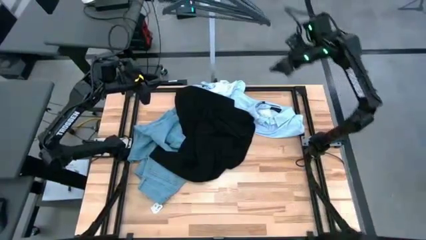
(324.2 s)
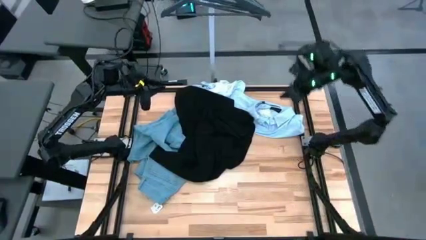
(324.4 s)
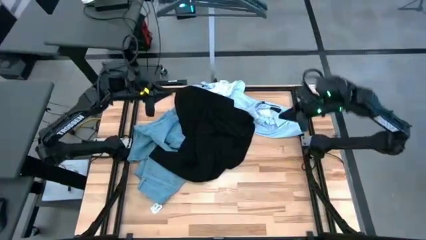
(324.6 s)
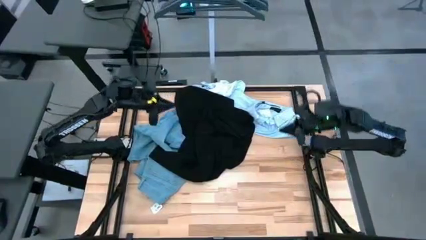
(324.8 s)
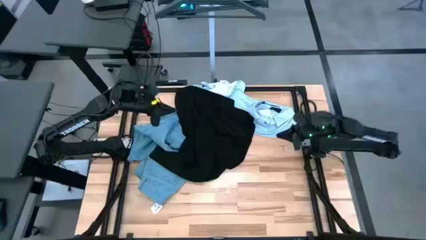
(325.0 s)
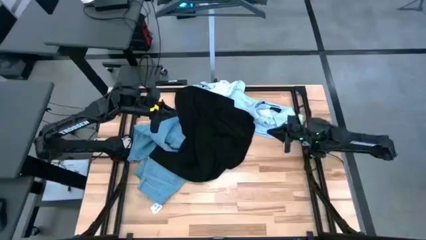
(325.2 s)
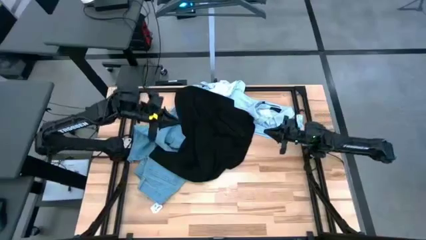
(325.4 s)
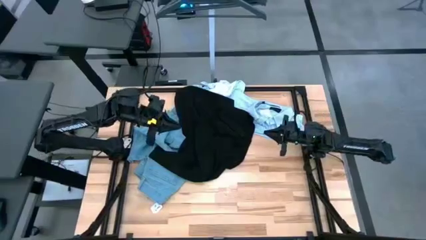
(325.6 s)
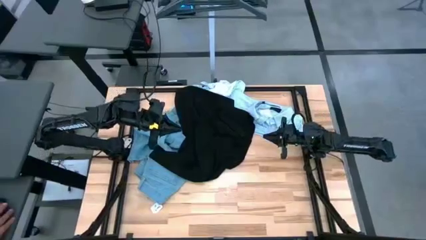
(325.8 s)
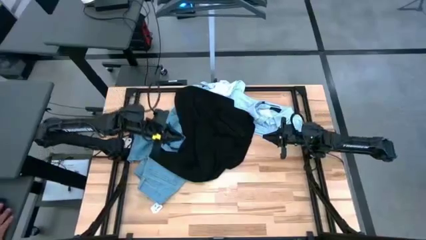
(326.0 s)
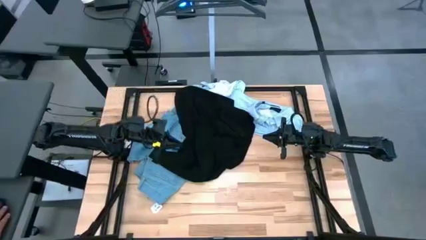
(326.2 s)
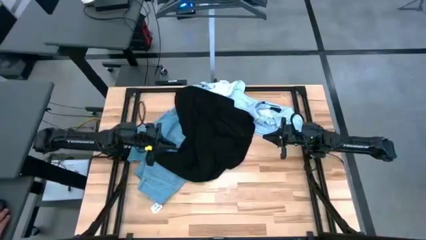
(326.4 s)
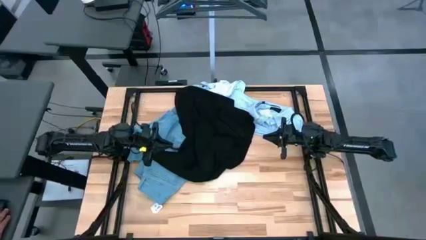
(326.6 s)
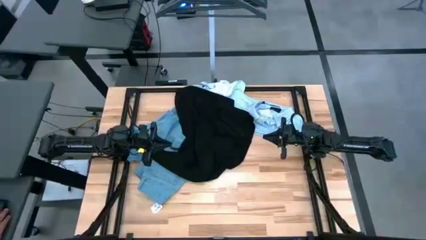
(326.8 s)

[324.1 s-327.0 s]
Task: Hang clothes
Return to Home Position

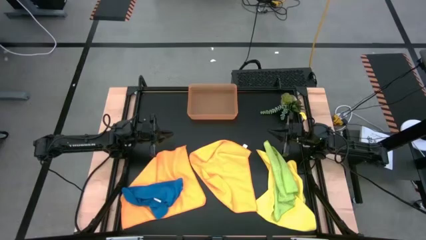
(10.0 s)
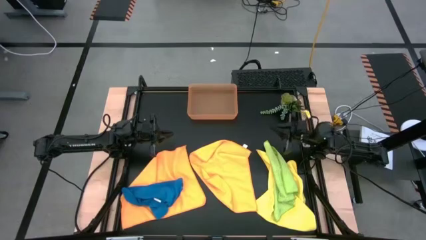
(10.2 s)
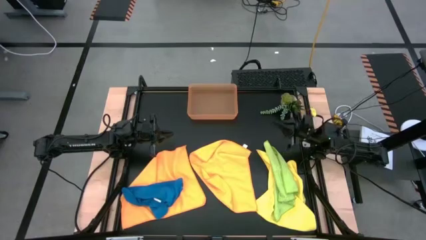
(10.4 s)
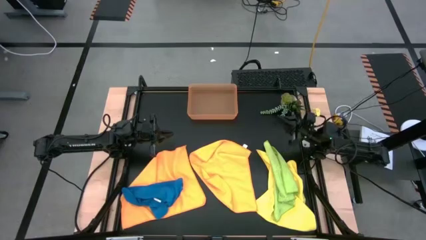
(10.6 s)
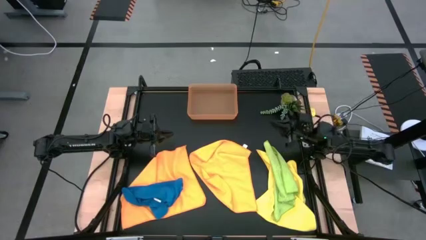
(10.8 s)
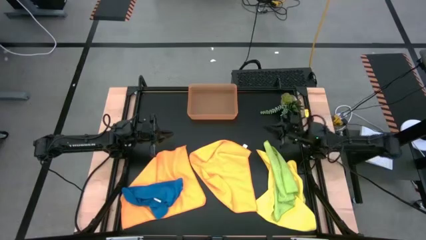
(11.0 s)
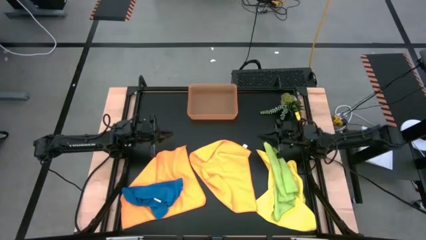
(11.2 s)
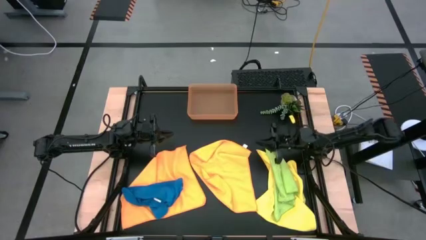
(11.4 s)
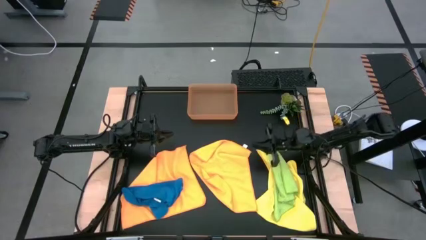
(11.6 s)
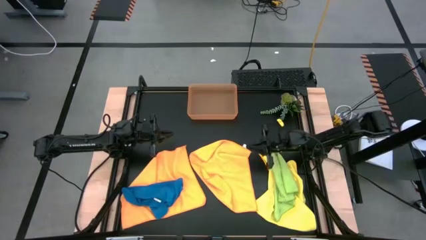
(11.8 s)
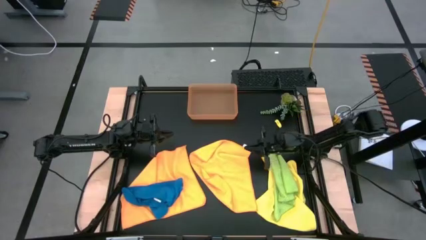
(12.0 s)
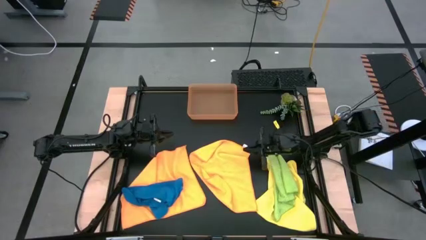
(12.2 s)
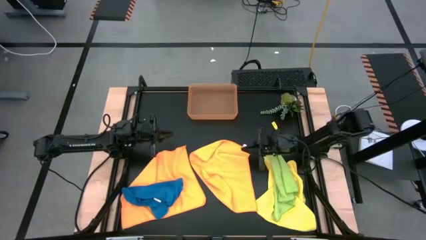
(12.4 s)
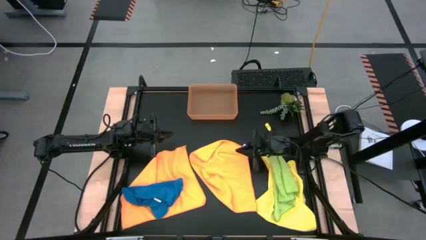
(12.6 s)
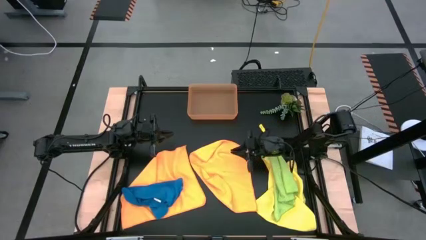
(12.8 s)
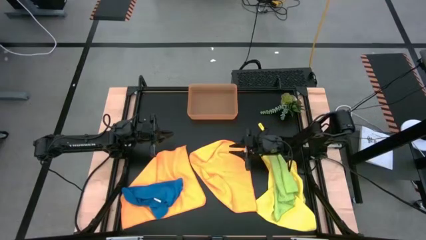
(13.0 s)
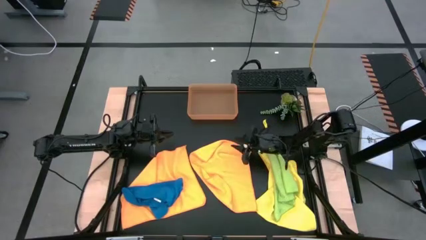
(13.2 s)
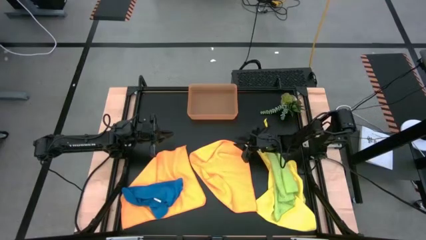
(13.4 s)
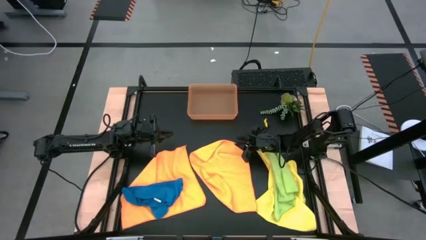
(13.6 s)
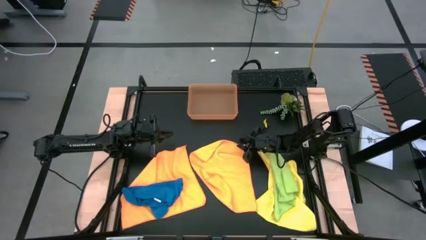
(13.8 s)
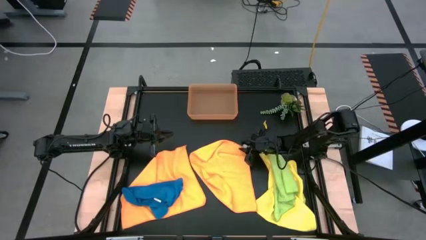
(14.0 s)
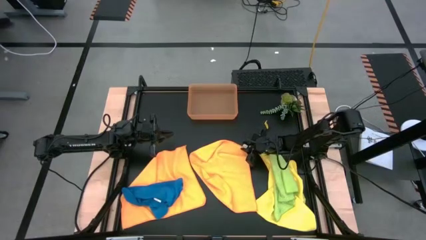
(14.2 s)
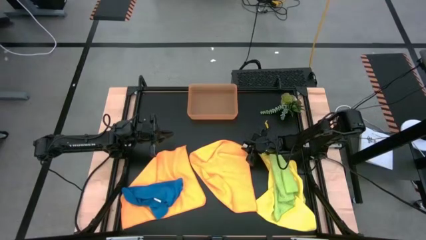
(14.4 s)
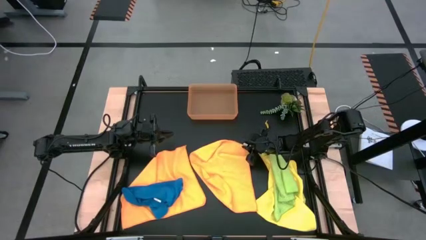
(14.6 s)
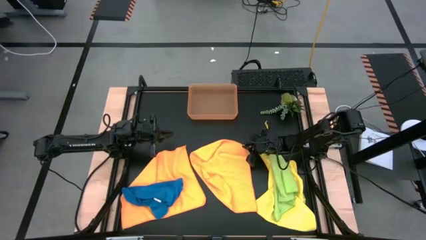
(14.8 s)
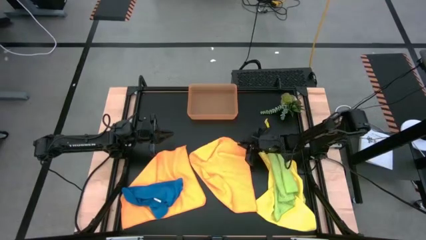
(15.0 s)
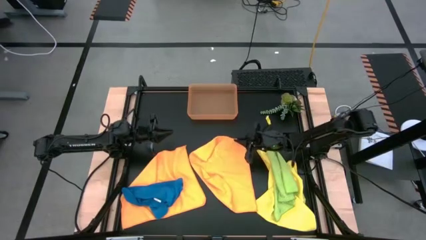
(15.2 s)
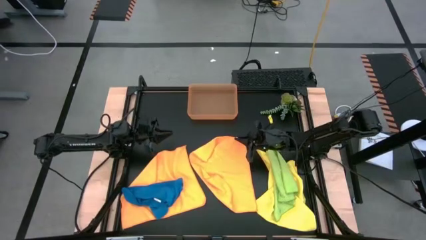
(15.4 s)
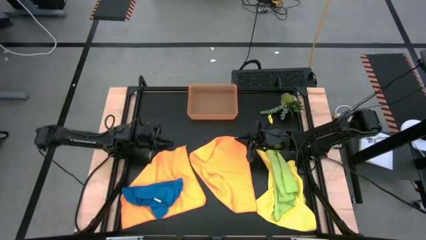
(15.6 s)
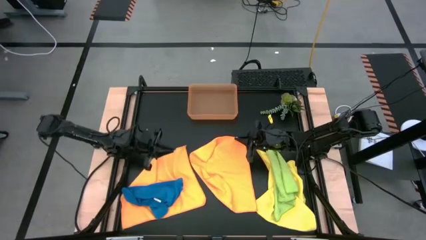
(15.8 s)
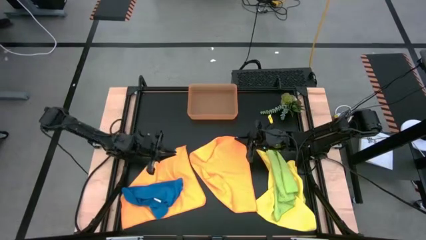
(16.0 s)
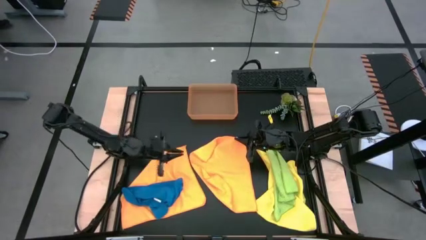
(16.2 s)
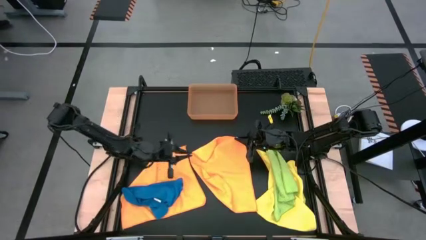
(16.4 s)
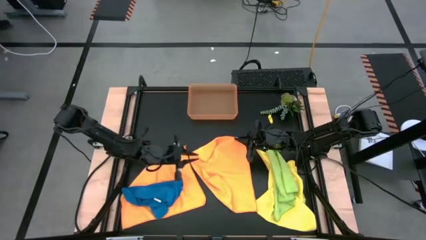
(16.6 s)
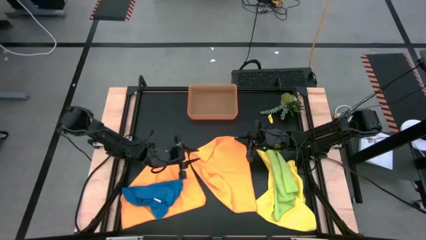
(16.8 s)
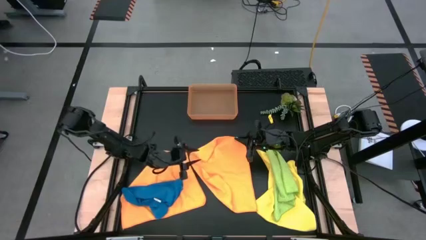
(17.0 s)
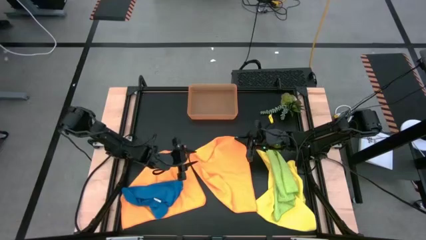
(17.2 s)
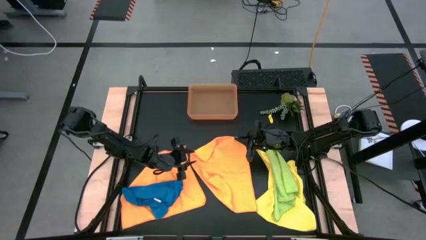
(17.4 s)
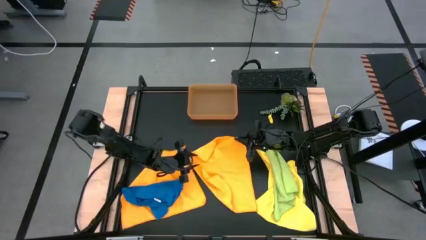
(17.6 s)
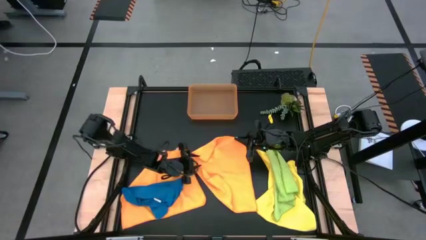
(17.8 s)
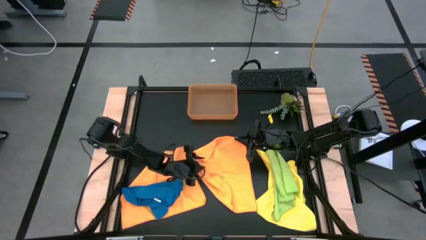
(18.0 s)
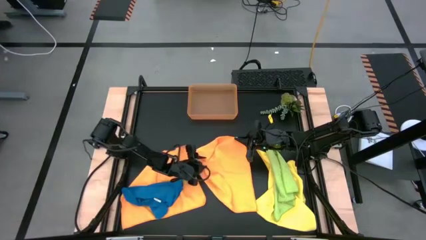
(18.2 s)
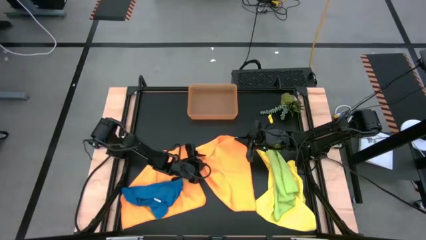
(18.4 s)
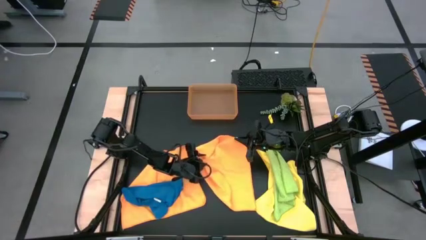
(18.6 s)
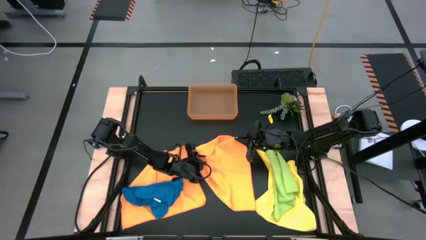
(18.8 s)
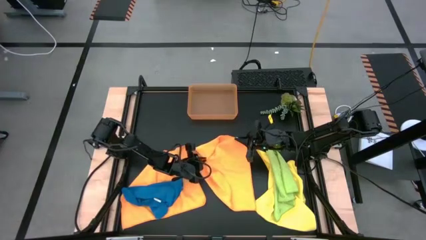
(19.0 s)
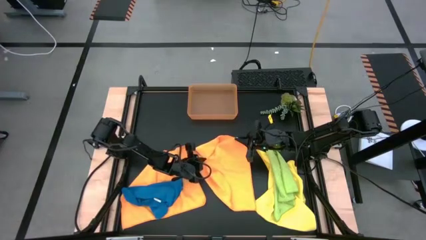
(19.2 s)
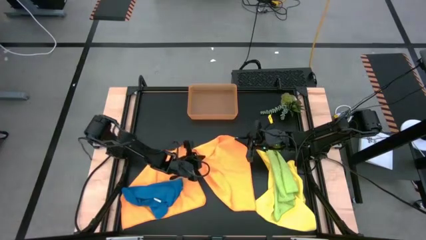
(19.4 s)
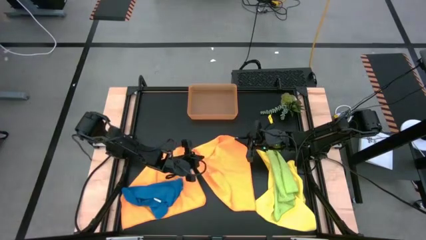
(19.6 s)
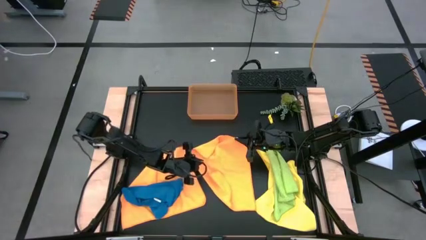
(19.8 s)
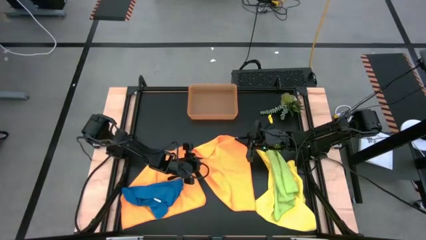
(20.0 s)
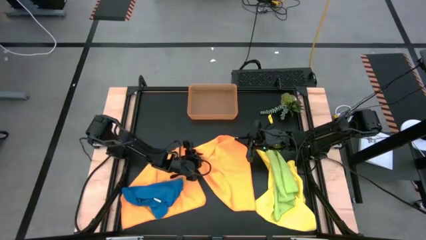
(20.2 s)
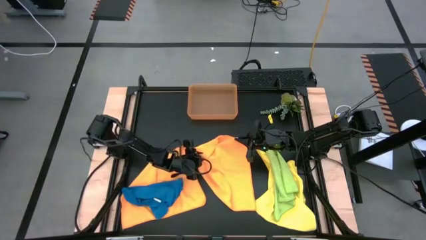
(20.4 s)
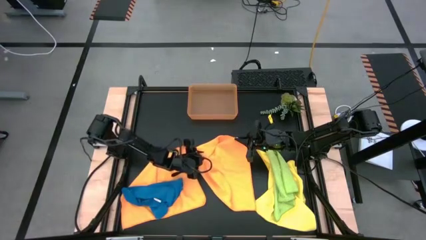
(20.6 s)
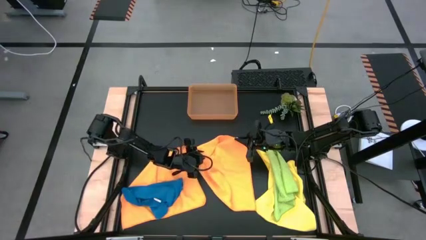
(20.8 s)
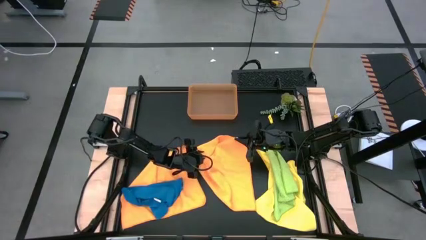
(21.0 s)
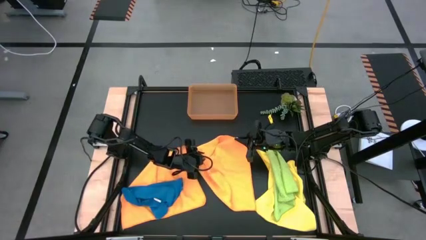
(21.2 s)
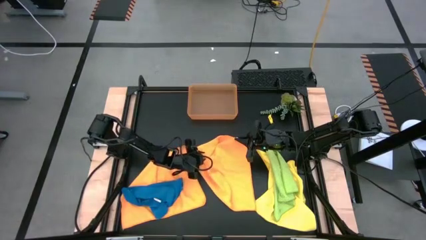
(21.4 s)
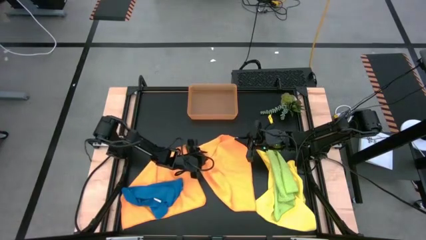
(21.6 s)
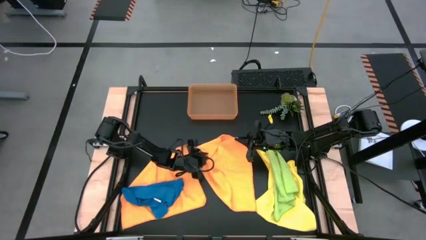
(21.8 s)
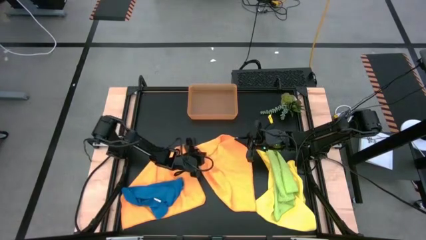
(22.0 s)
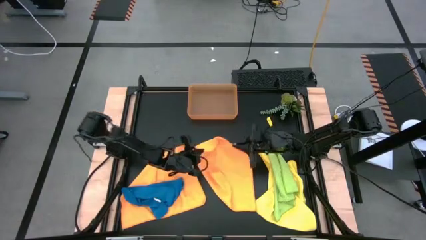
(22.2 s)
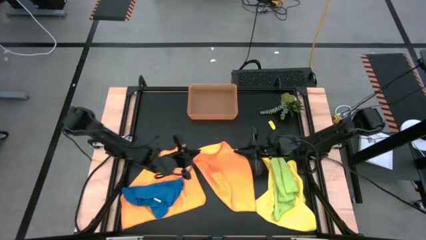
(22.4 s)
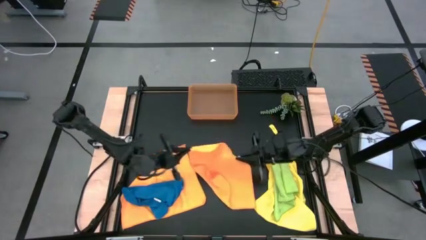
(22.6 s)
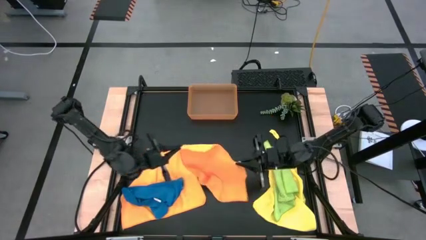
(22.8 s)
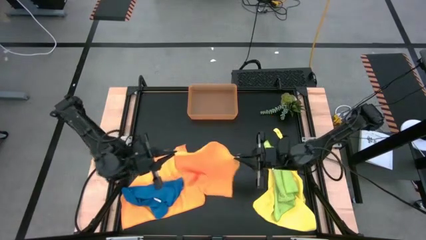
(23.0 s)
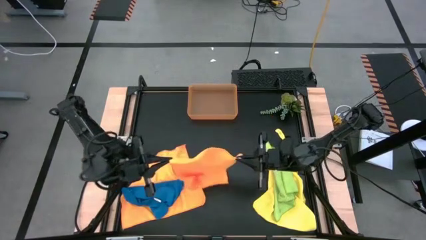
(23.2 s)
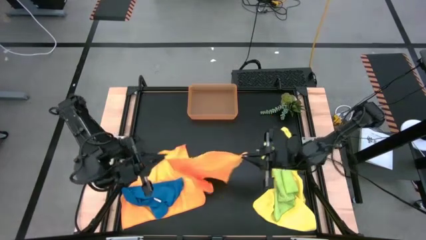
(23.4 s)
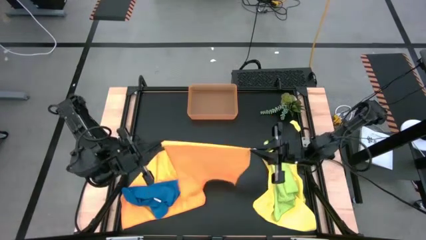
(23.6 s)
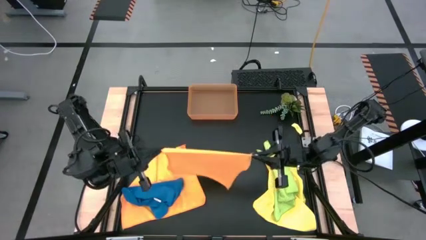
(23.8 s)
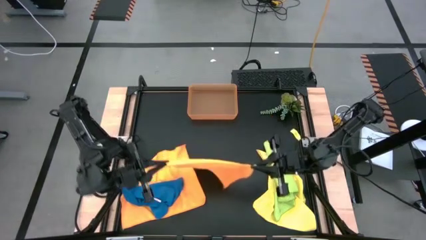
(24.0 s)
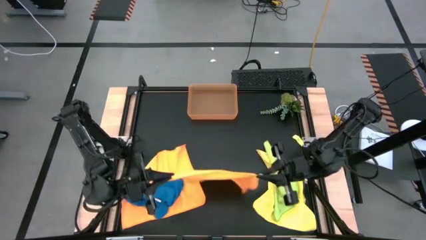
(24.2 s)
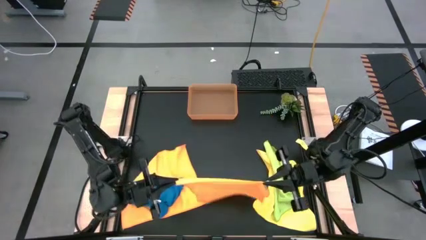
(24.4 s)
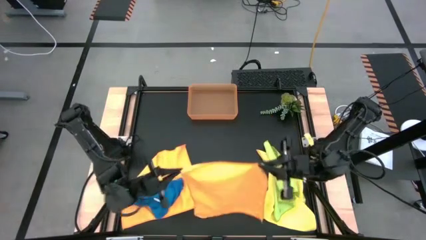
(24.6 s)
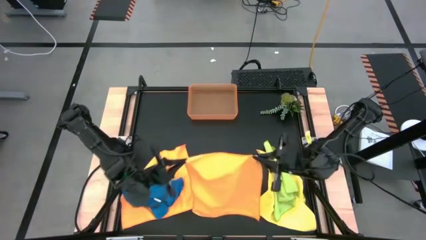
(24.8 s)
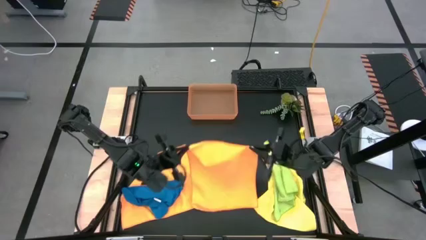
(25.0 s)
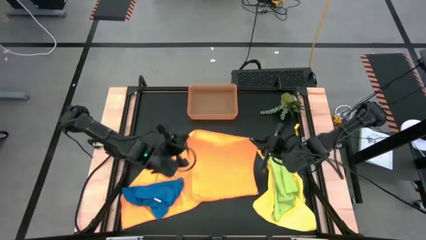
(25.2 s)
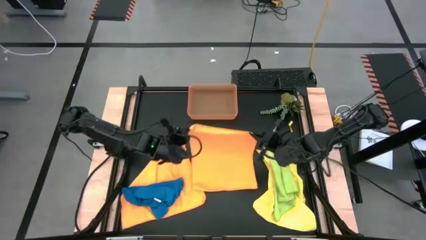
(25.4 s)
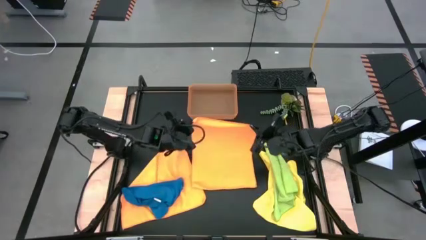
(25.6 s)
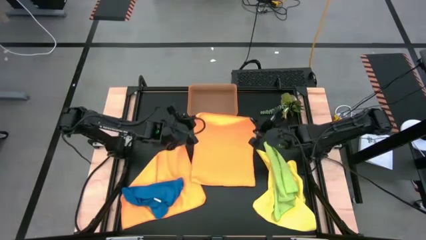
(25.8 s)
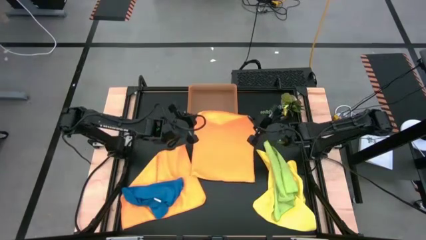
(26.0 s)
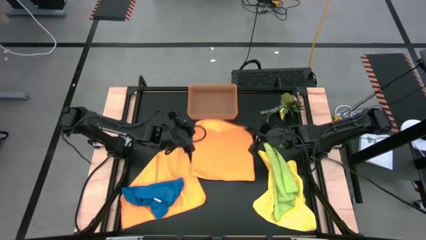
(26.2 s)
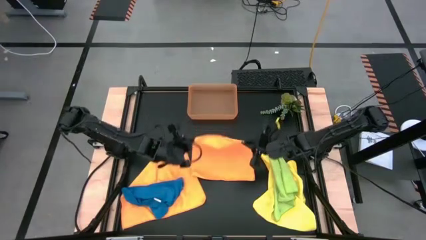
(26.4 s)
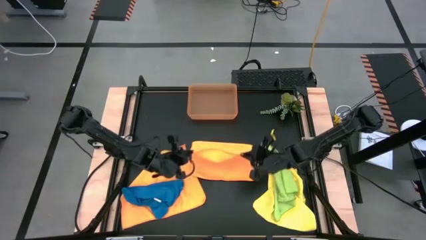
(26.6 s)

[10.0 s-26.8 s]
Task: Fold microfiber towels
Fold the right orange towel
